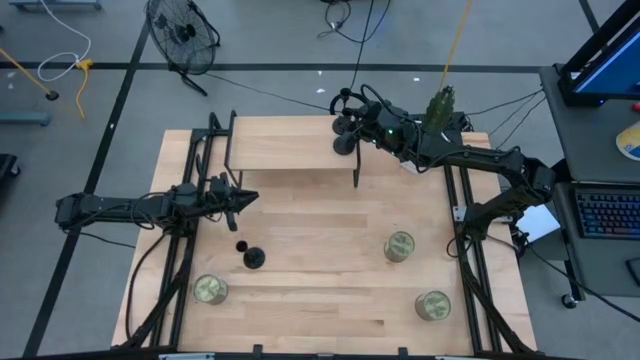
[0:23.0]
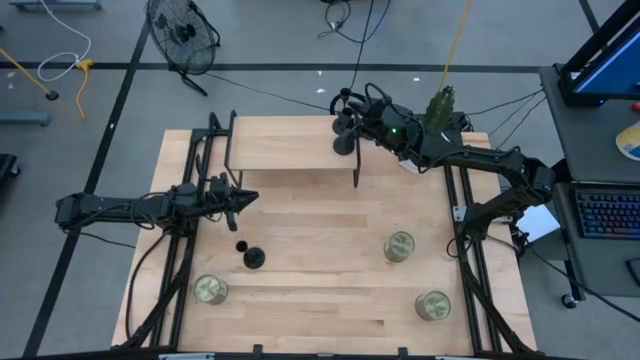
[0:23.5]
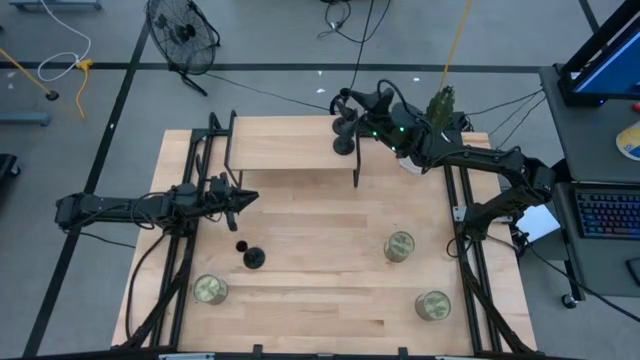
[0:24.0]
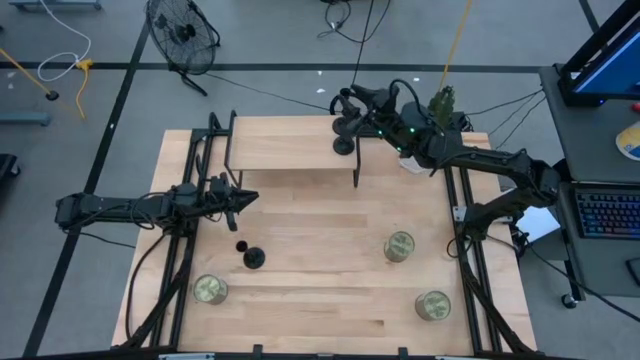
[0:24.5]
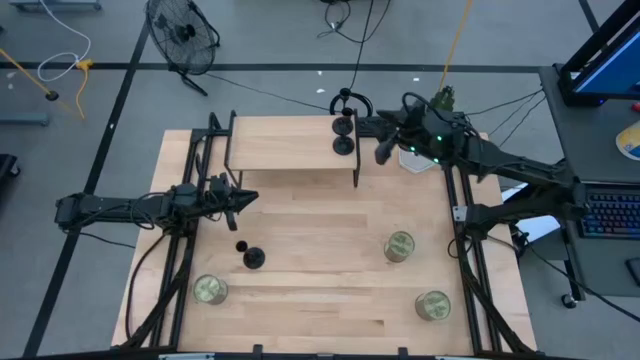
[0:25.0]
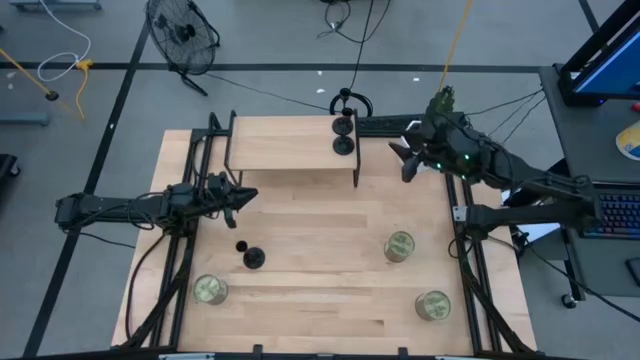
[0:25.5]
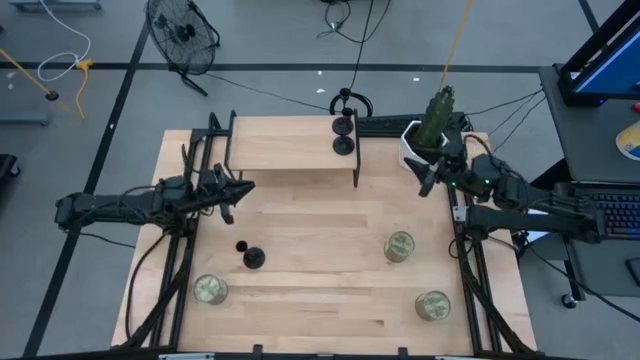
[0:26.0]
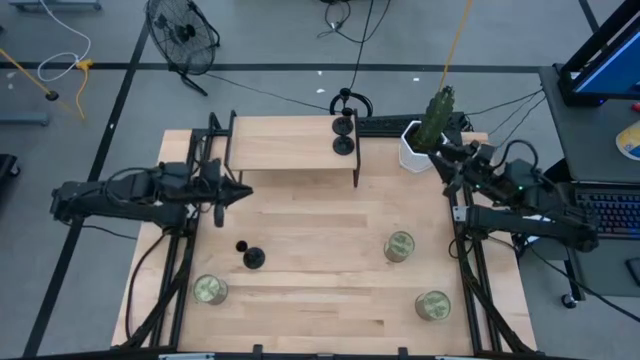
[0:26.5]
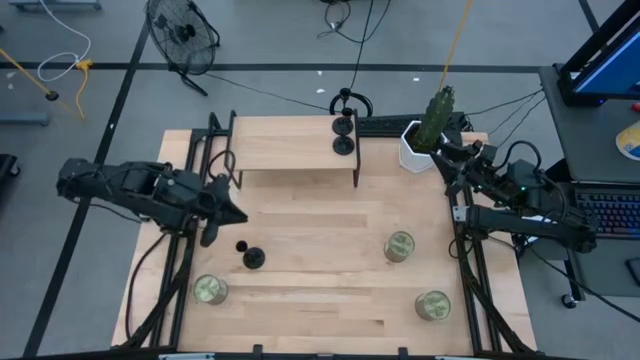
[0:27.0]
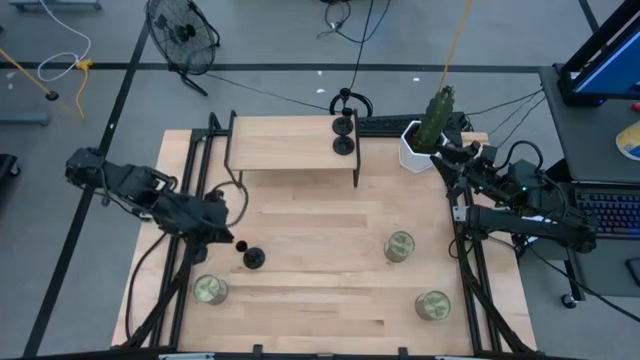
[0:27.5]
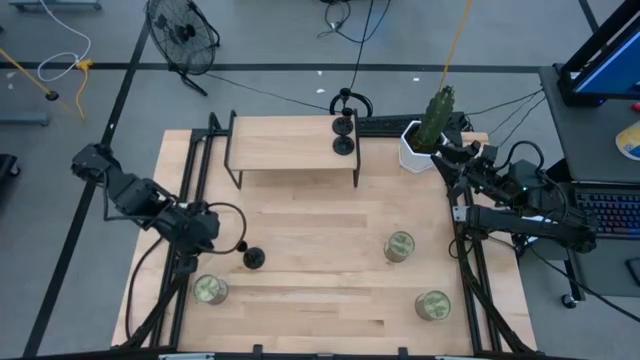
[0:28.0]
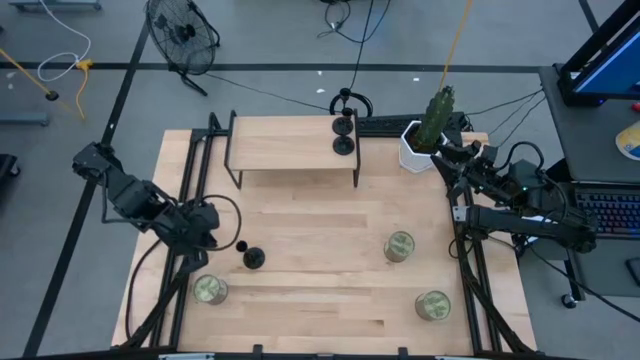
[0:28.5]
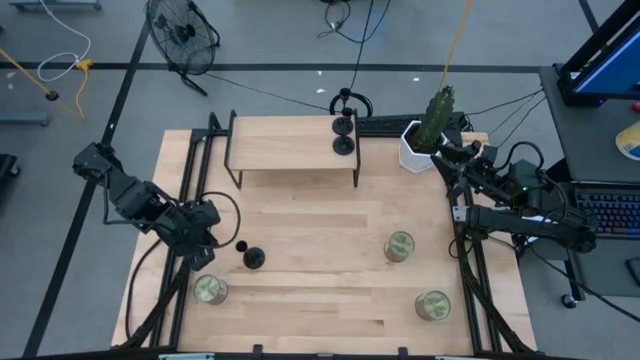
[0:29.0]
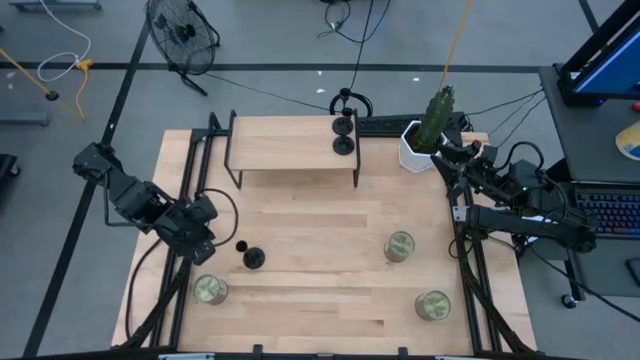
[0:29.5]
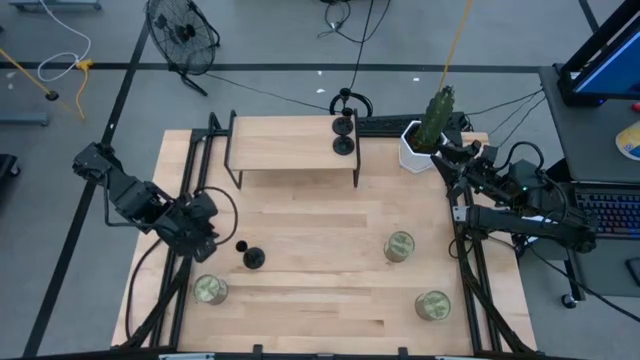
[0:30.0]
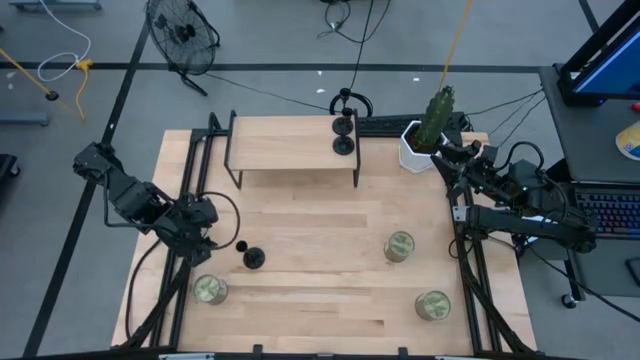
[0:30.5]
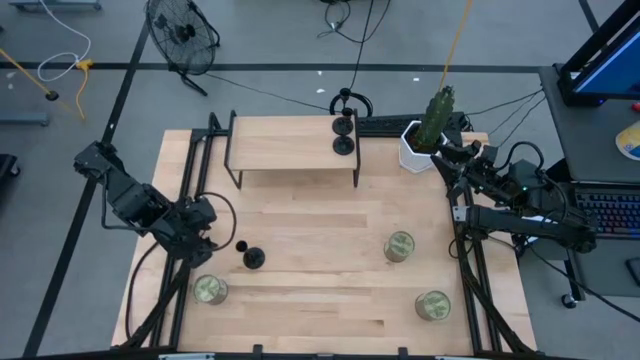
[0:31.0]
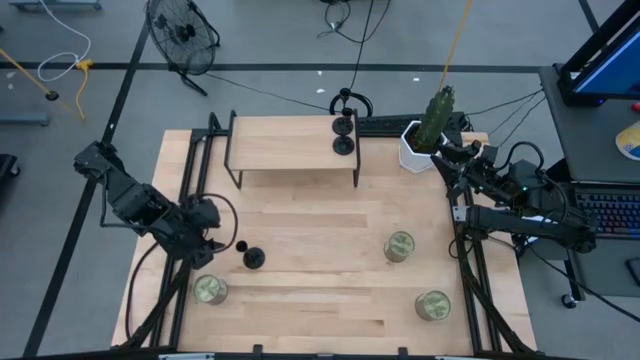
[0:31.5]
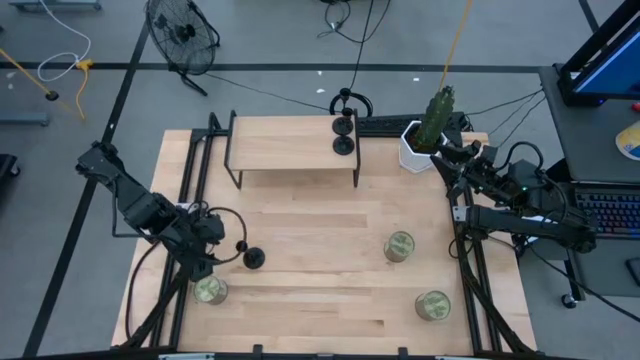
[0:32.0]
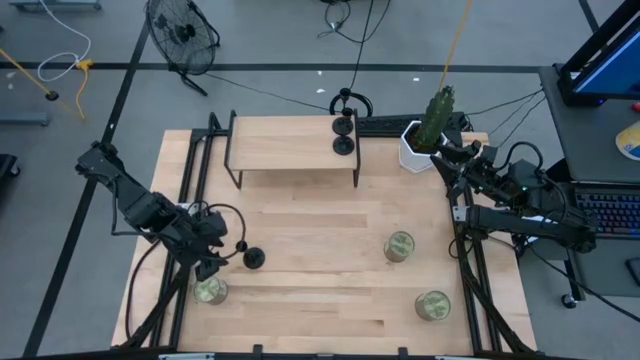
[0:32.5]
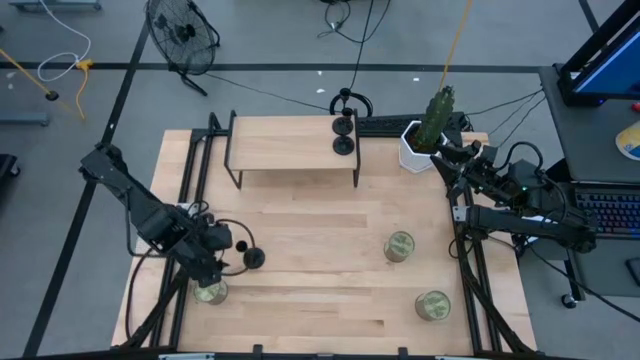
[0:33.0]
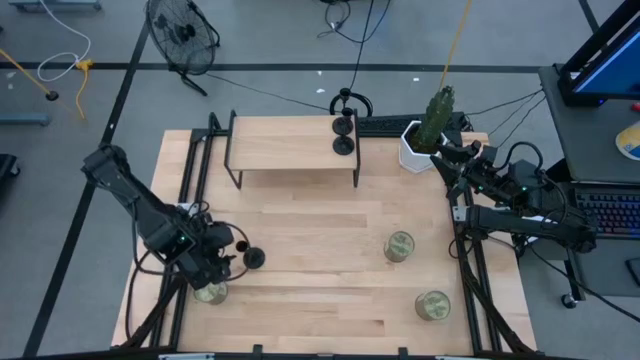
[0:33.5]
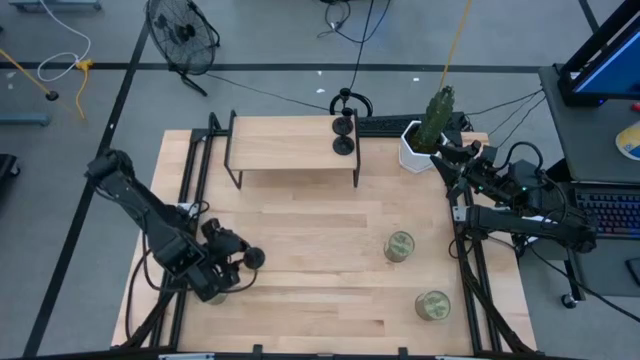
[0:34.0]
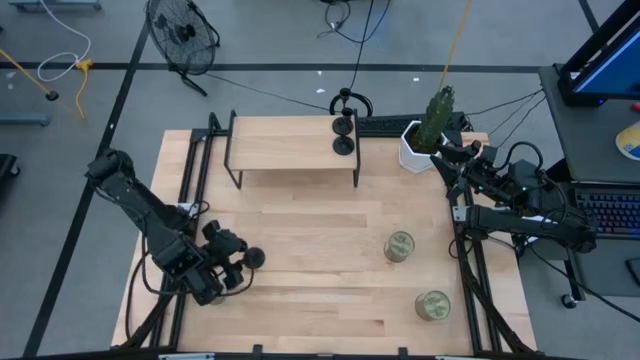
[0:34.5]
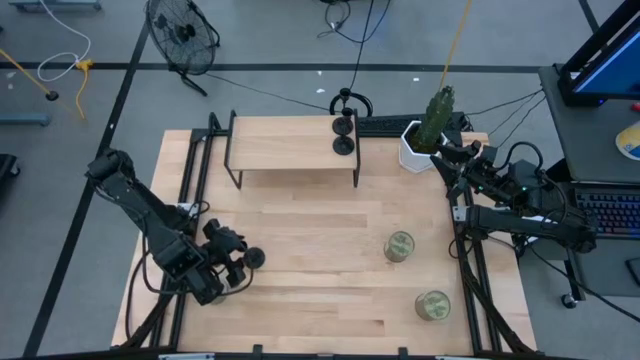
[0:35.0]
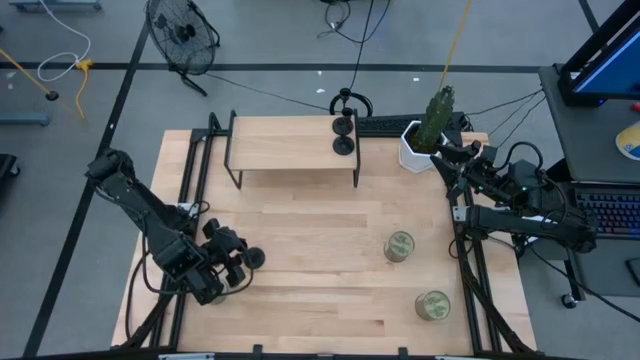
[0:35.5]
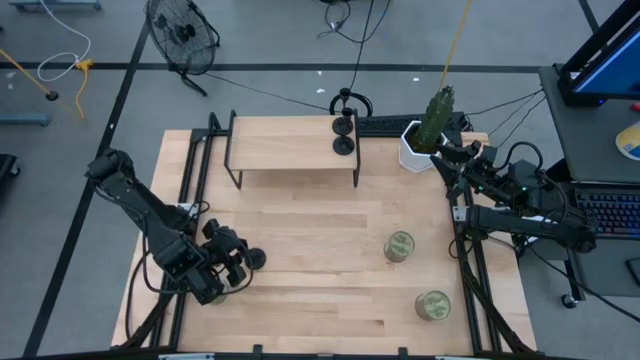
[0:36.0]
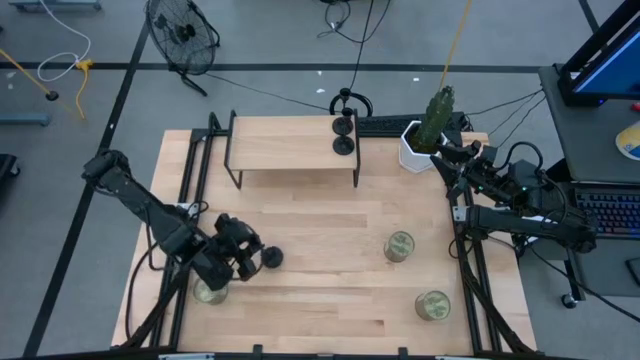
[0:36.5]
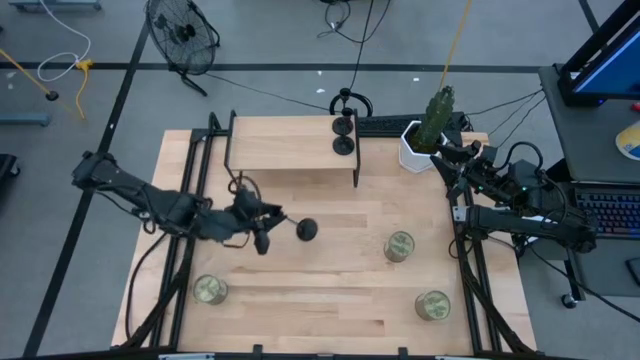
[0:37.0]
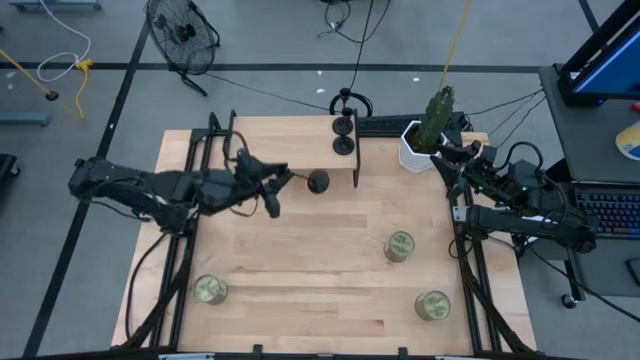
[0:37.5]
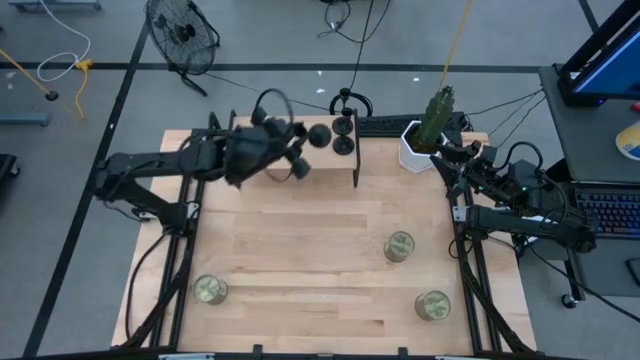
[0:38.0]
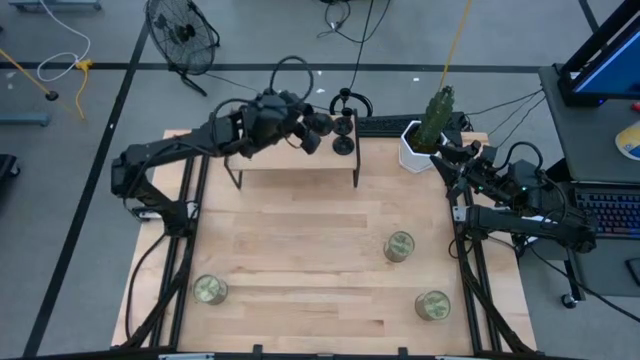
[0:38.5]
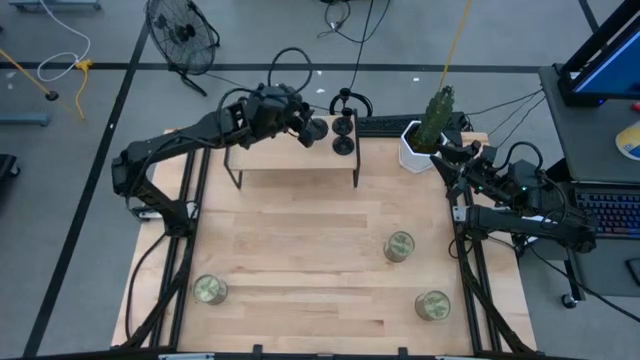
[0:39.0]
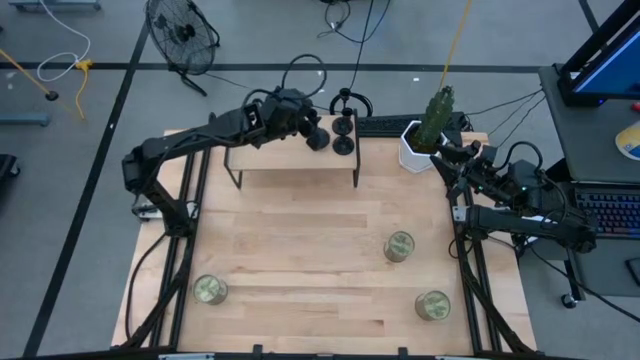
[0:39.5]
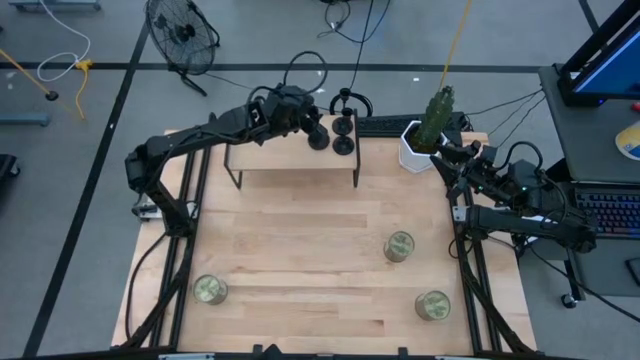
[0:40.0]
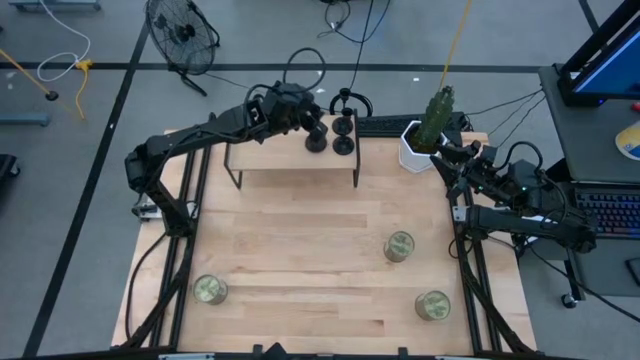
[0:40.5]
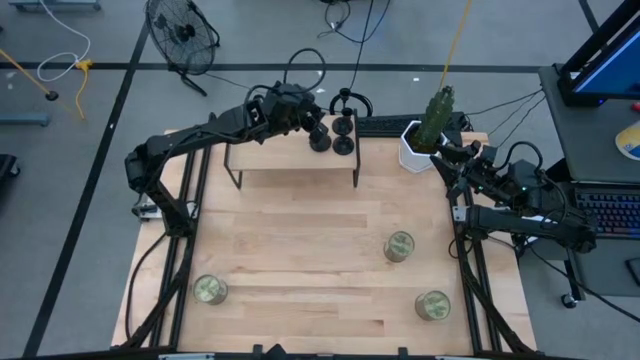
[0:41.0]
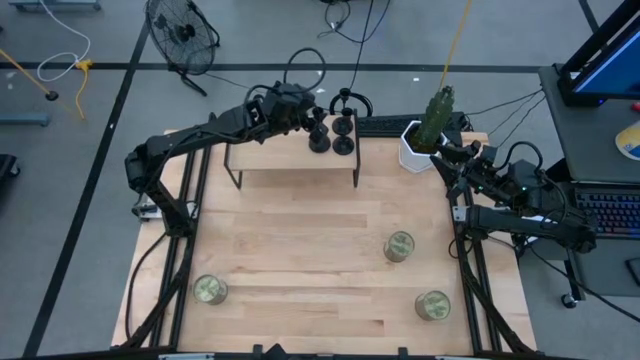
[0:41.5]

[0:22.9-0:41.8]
Task: Pick & Place candle stick holders
Put the candle holder on the shelf

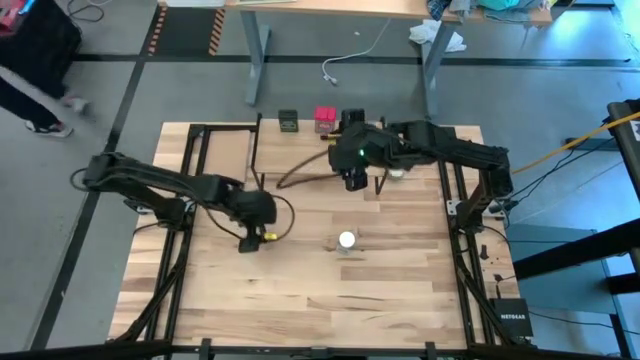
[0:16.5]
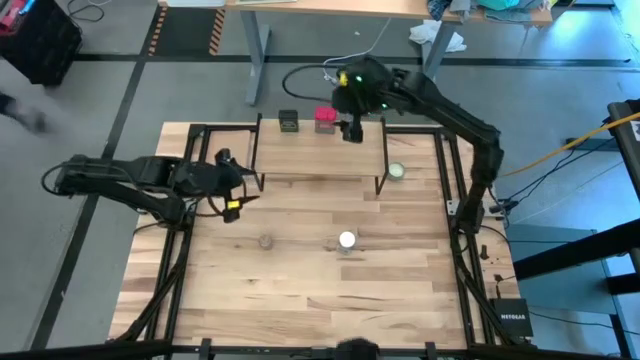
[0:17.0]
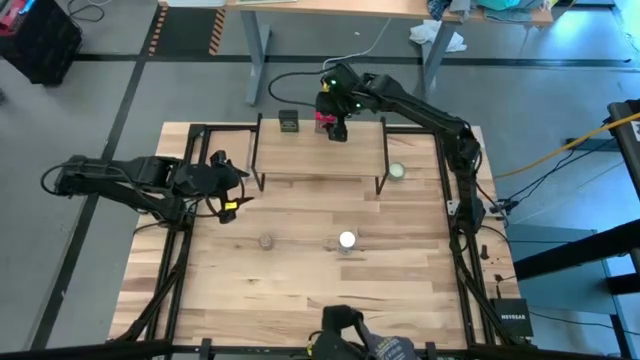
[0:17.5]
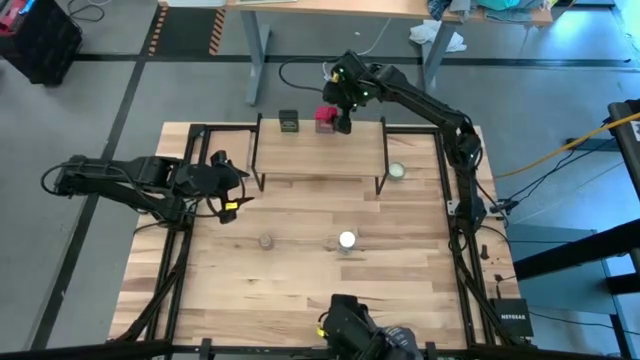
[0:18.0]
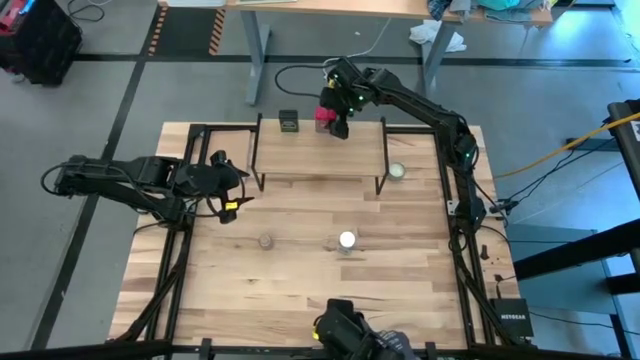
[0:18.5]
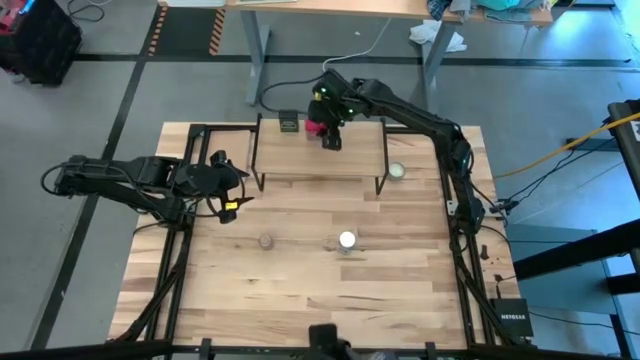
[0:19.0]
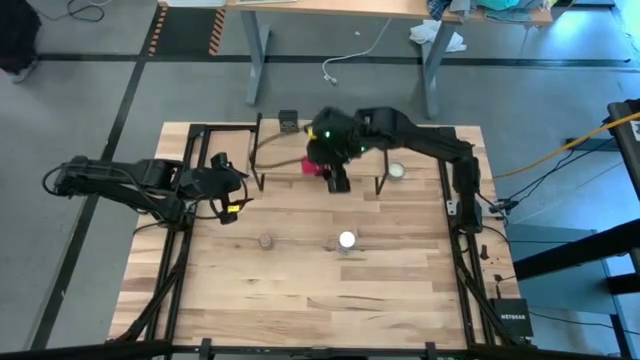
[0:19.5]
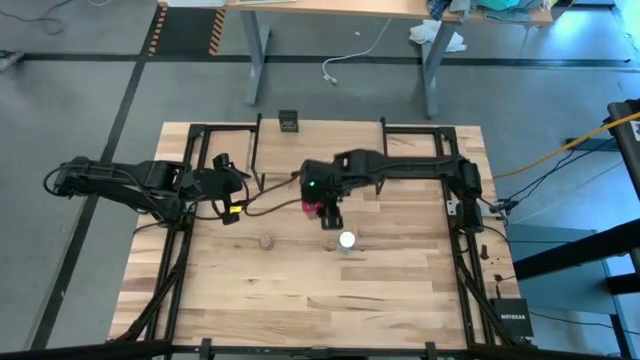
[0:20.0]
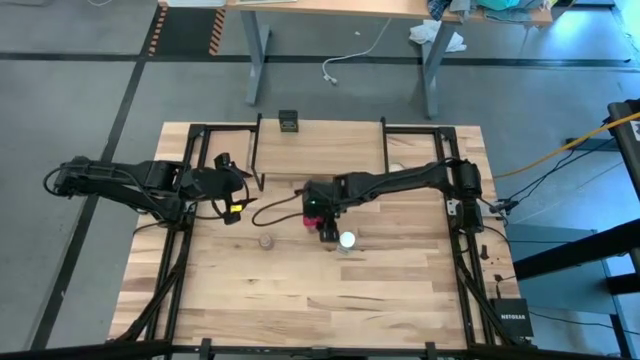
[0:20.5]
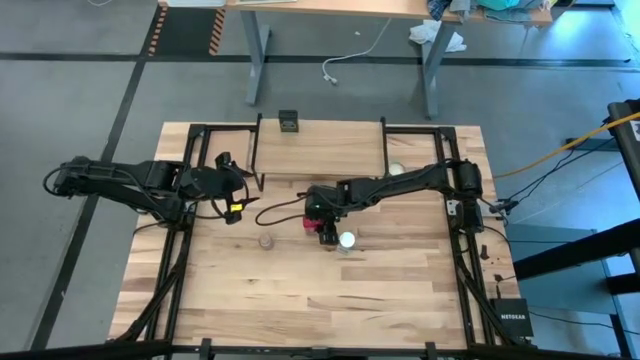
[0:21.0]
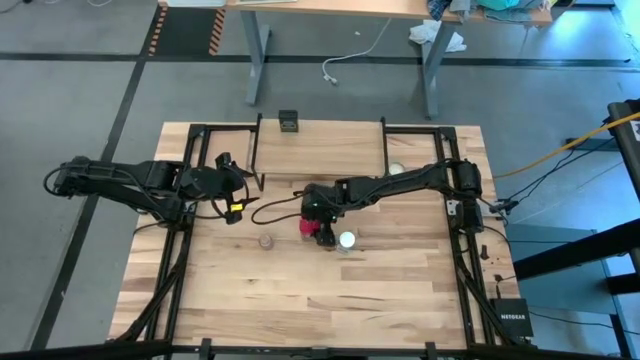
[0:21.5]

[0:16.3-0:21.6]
Task: Shelf spices
Remove the red seasoning can from the shelf
